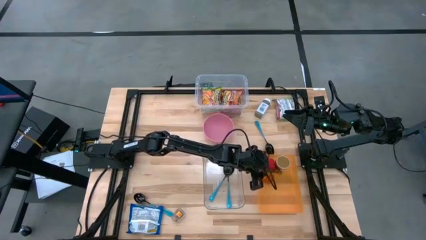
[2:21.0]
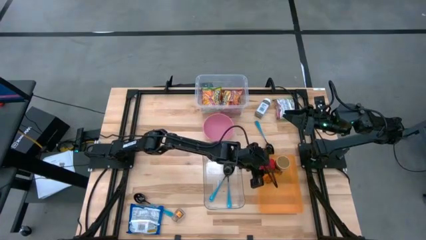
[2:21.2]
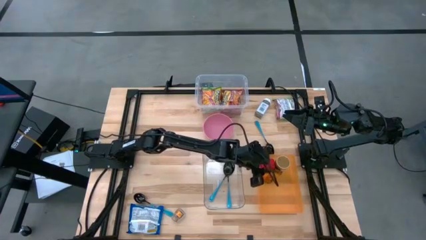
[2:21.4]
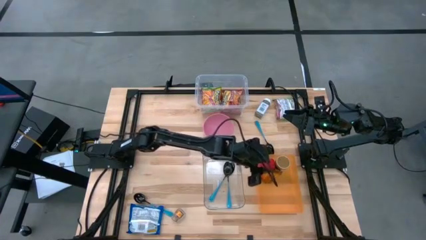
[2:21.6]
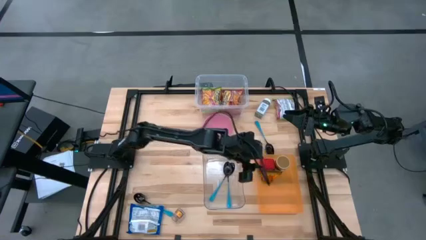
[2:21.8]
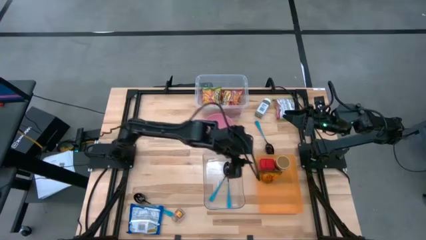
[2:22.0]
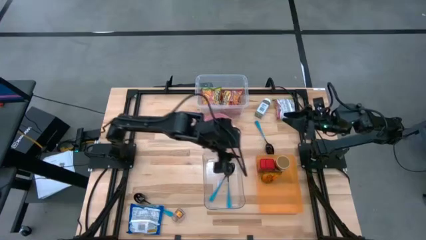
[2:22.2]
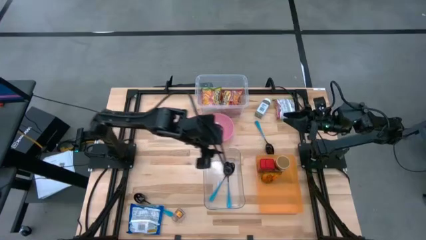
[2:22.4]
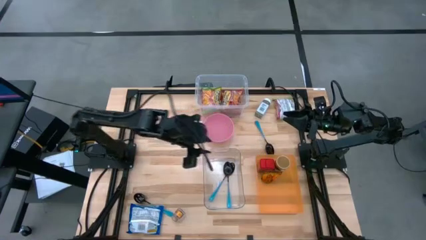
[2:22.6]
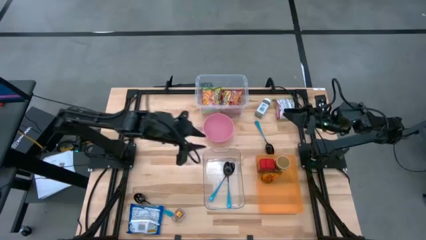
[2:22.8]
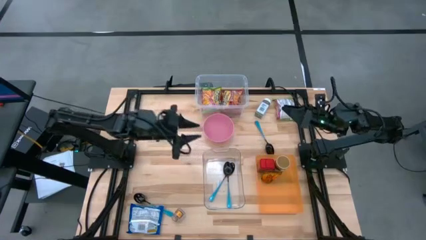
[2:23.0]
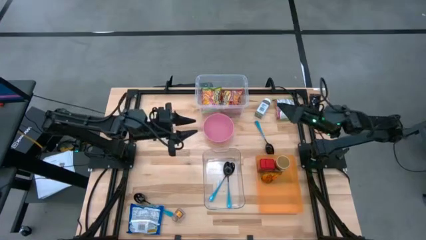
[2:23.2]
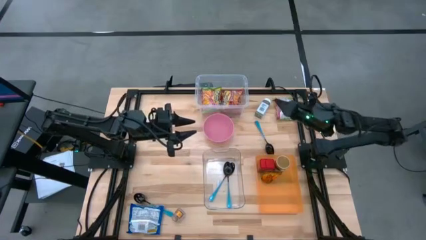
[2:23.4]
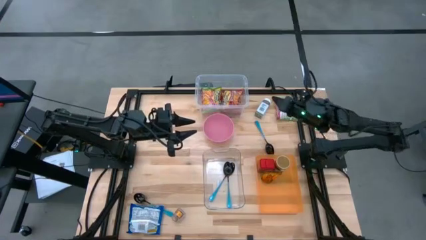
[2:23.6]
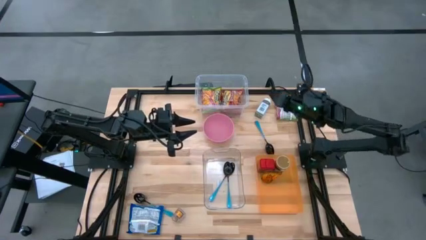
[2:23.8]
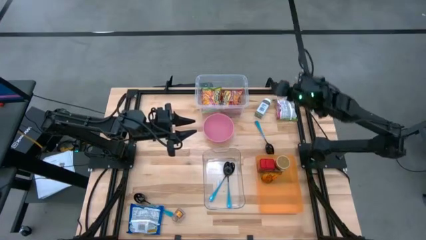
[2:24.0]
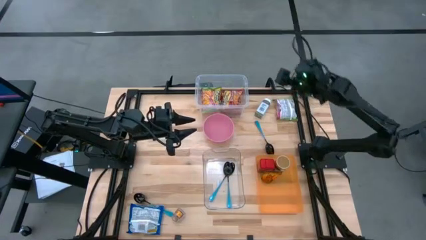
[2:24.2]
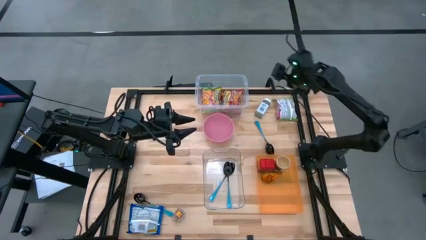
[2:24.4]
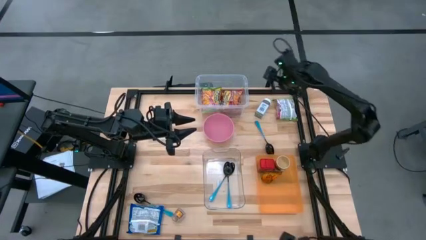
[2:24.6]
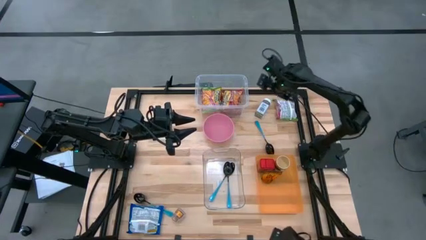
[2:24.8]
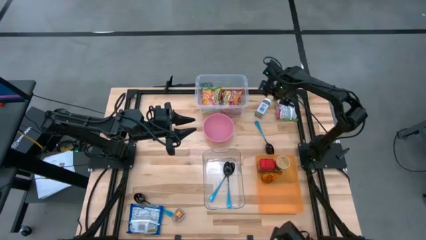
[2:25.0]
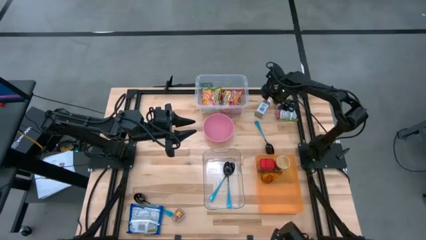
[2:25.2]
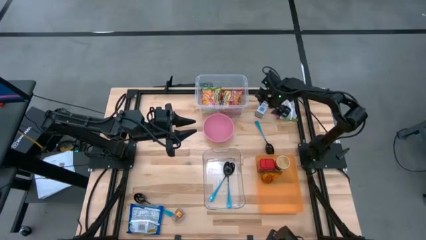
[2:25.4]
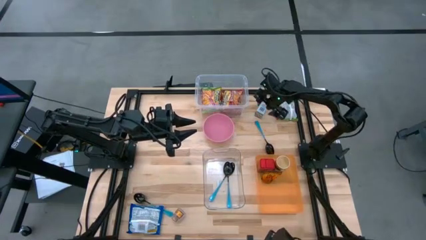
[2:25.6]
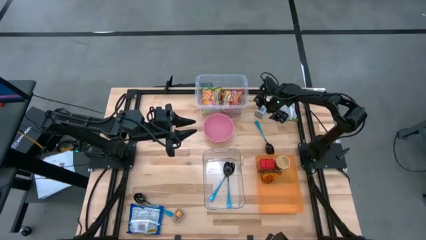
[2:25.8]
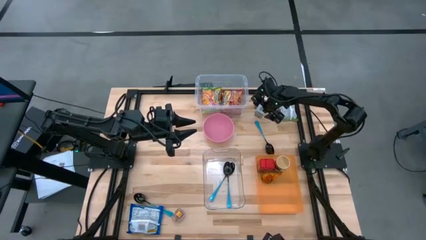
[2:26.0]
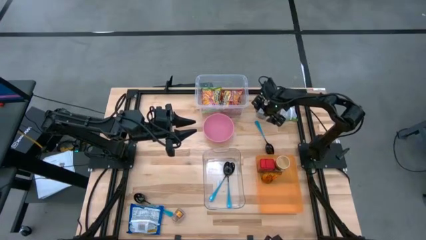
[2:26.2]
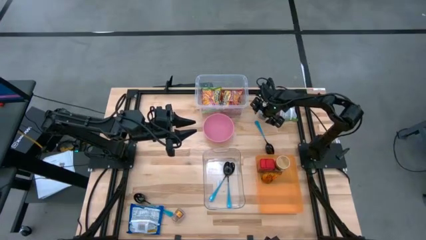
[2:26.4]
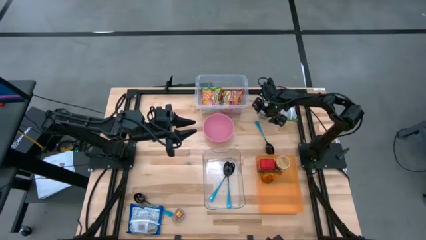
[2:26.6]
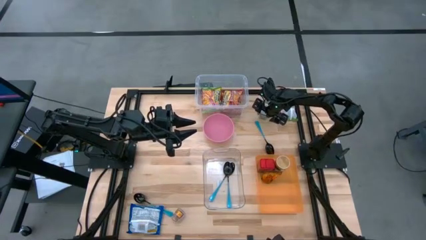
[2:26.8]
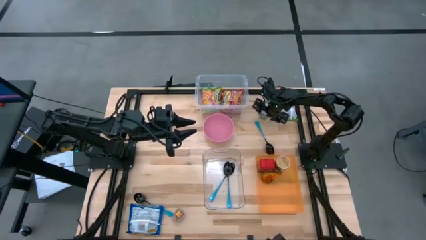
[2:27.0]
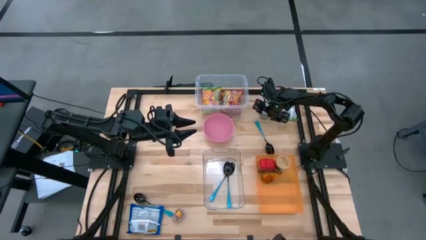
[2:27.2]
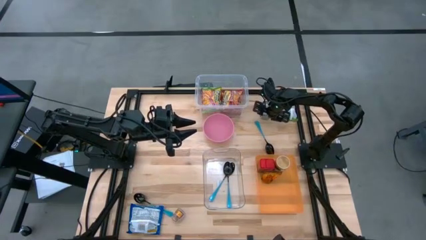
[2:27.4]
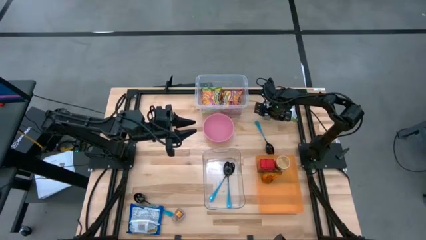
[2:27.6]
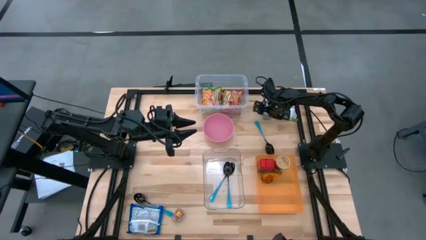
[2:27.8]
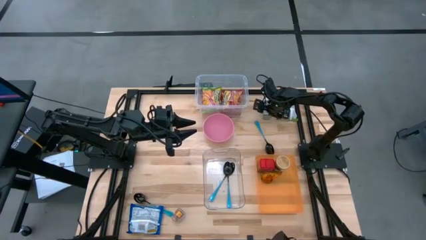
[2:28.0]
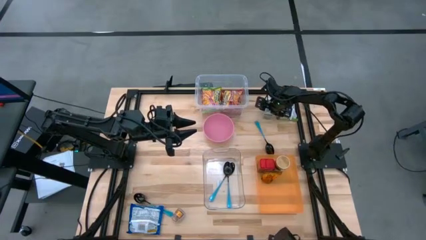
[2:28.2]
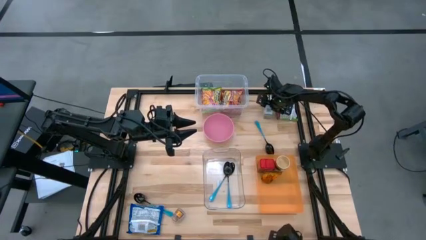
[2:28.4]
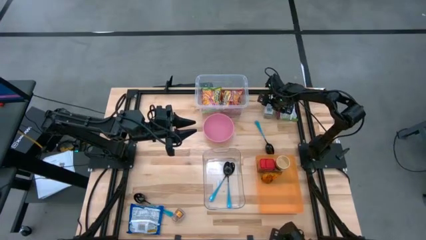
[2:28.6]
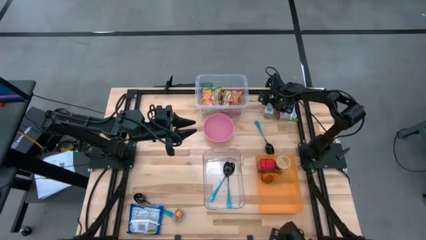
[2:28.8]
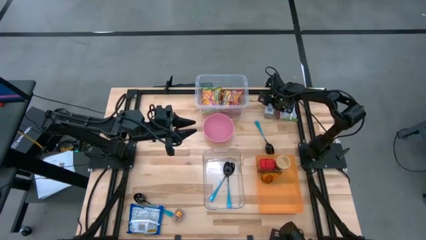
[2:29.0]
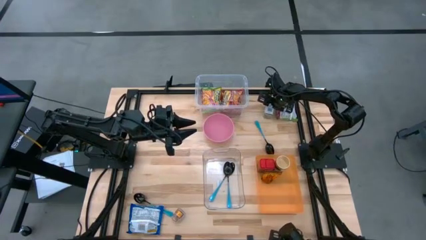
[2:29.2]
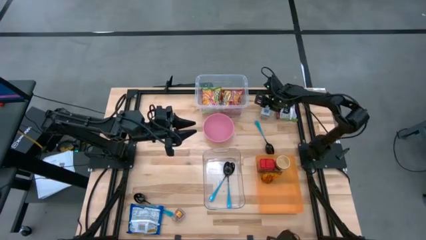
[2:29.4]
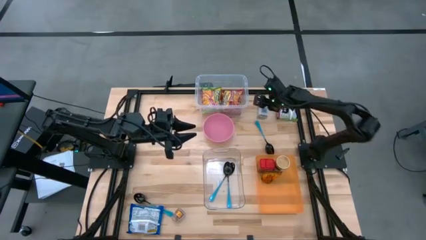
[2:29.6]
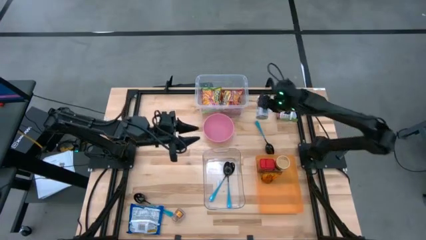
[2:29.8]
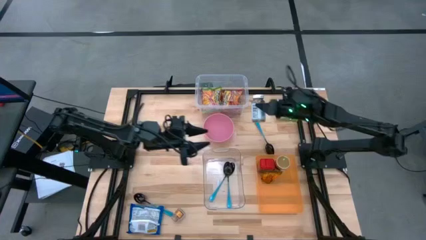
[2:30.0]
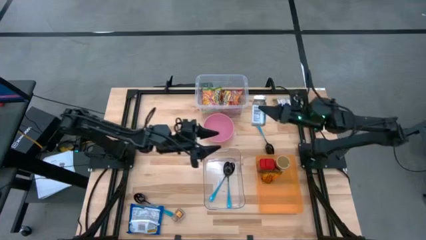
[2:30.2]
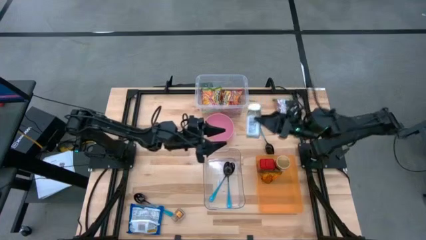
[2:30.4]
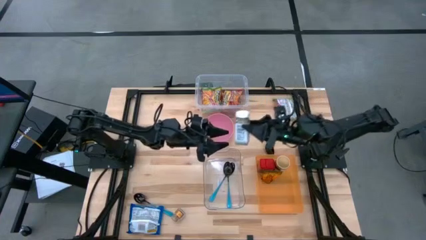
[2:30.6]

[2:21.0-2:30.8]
Task: Pick & Place Food Item
Put the white seasoning bottle into the orange bin

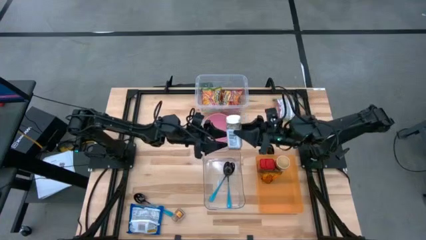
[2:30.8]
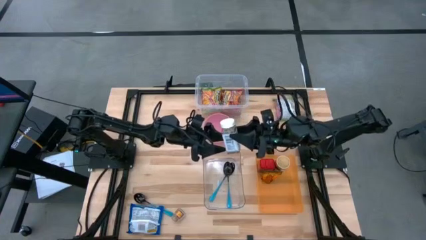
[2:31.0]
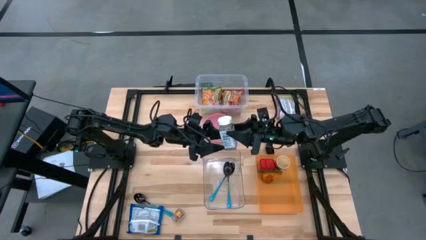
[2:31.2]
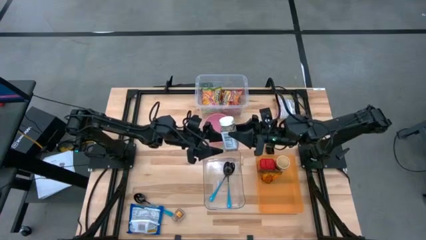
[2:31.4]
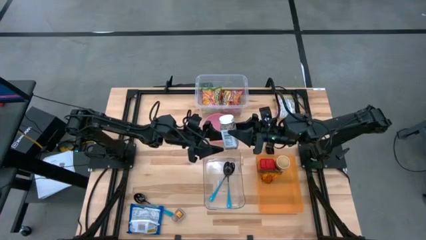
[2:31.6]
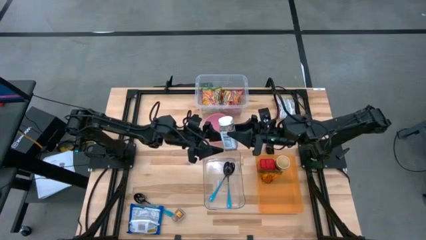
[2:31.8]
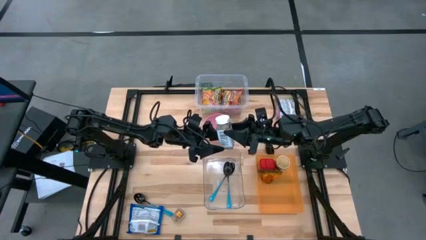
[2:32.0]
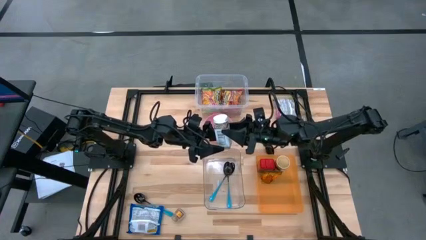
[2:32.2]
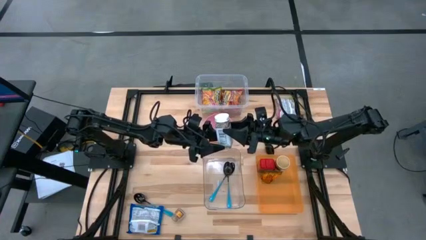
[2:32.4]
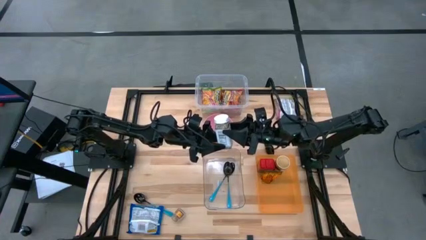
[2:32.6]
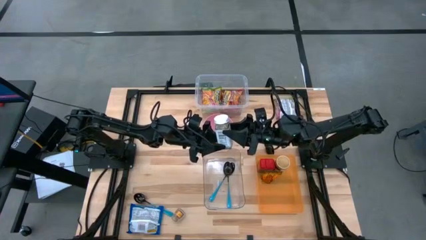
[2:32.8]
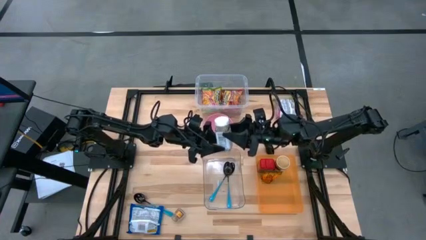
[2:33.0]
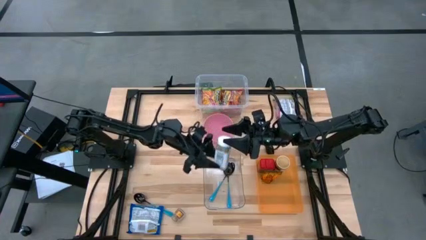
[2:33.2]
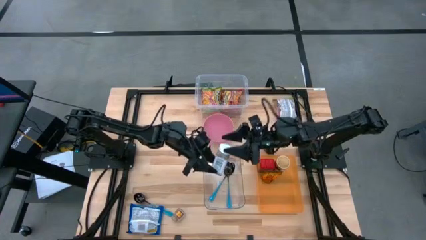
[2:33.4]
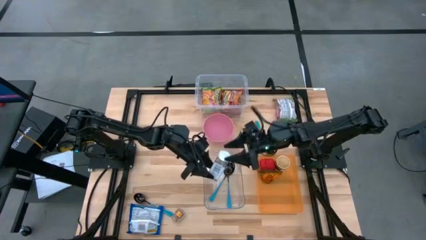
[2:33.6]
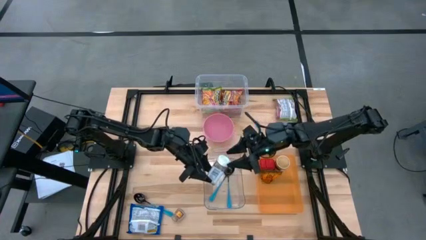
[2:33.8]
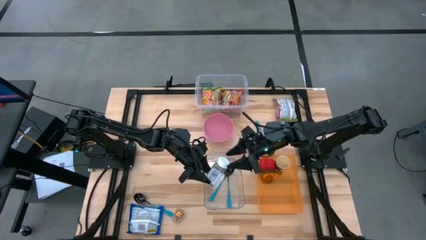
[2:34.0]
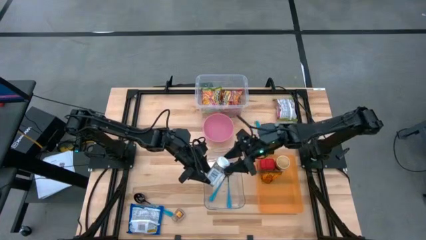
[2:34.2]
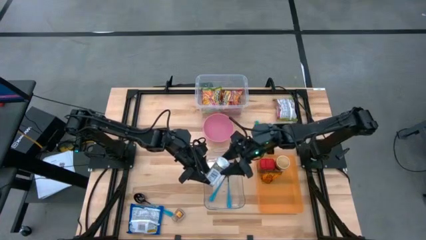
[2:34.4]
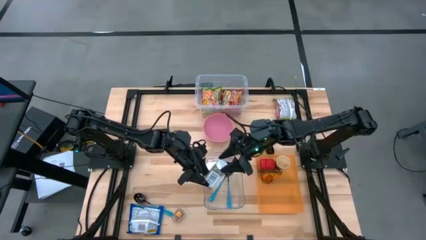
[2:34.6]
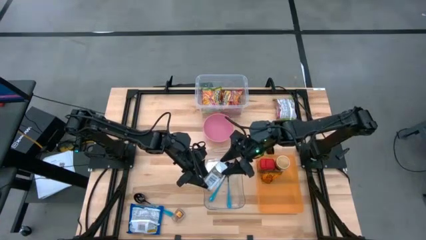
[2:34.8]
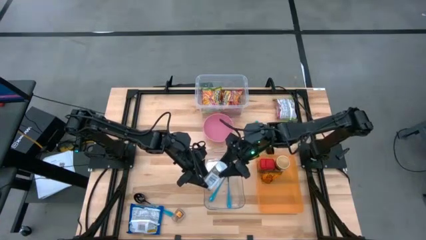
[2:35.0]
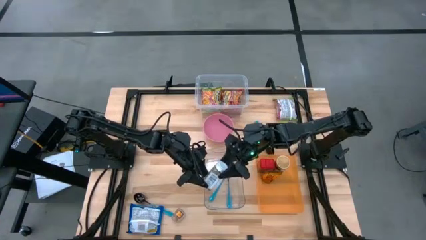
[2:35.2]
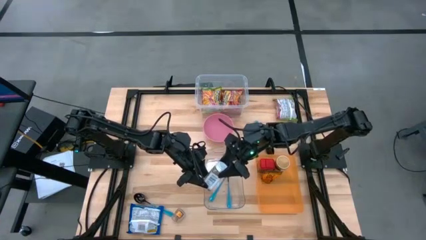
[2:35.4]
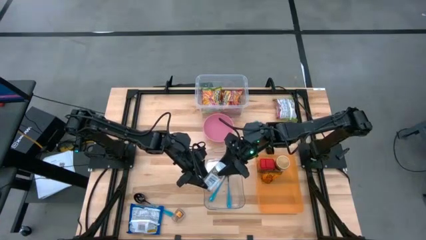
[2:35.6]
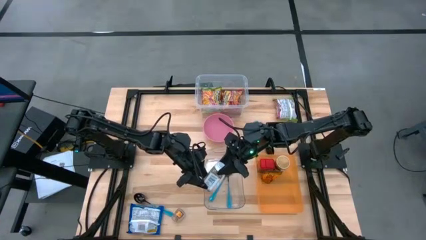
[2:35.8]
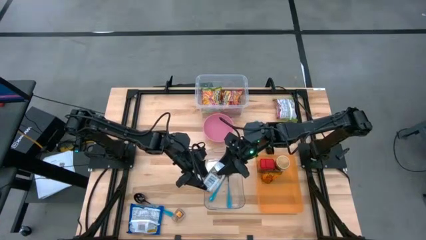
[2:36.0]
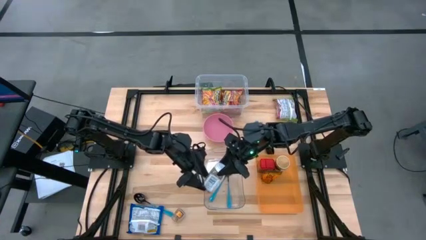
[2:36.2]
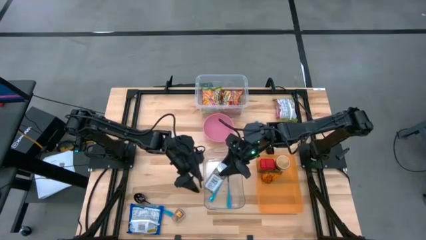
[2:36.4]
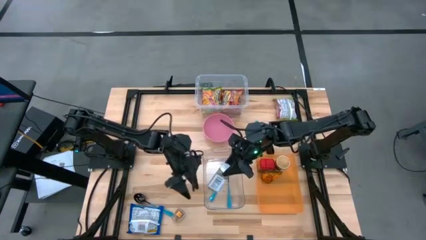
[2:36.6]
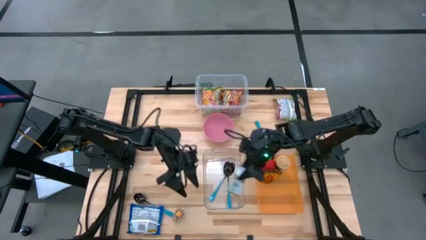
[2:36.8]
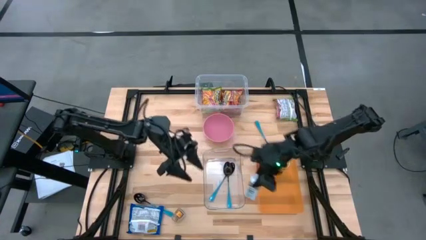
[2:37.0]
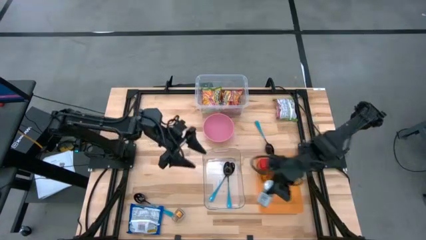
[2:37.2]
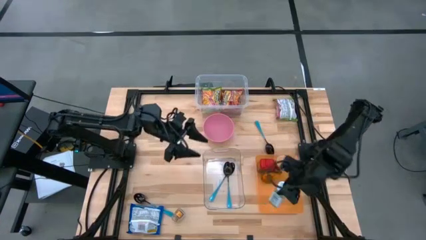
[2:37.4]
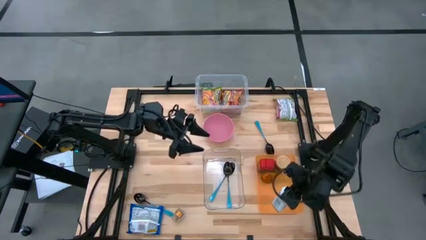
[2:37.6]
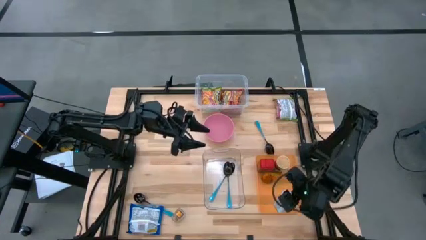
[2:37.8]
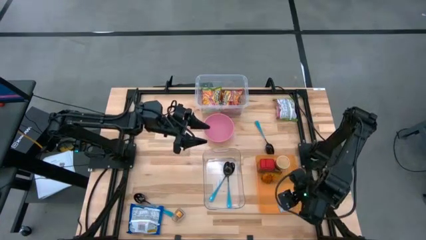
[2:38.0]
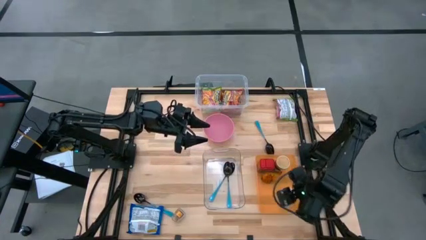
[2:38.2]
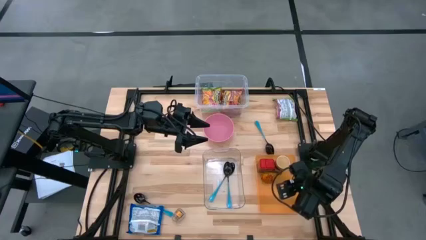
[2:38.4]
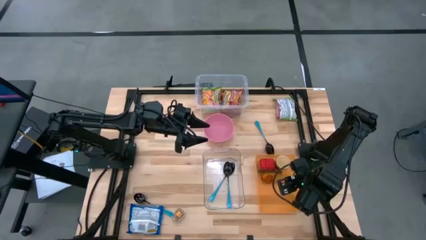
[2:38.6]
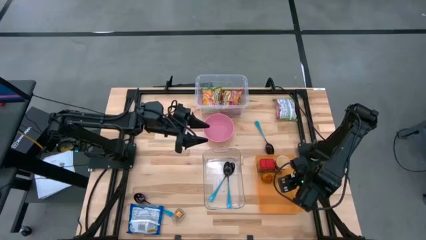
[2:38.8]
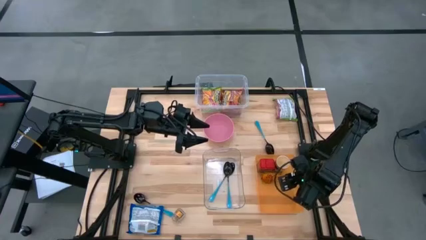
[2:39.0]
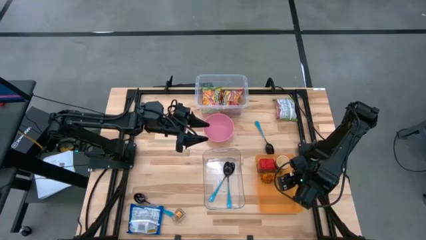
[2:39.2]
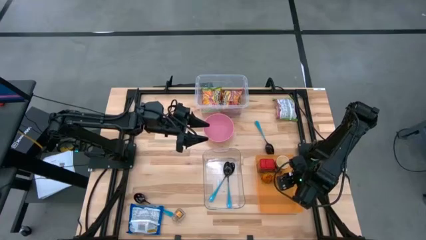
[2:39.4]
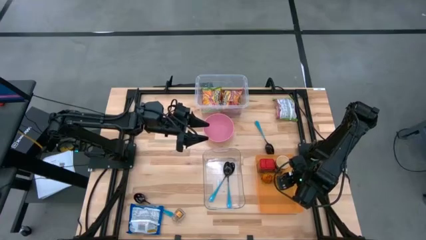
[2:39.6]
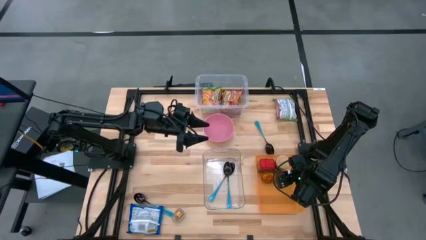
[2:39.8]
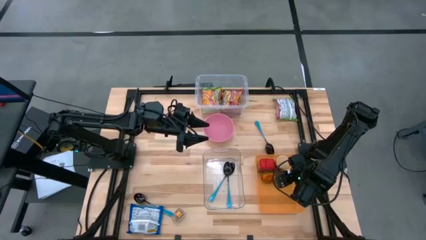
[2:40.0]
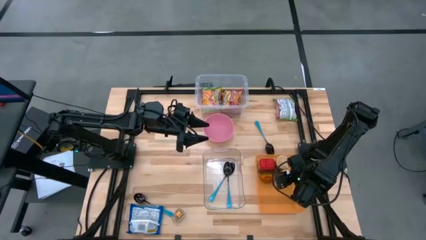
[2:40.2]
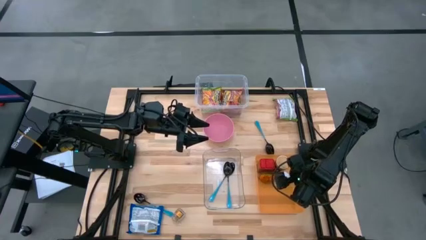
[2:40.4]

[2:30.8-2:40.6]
Put the white seasoning bottle into the orange bin
